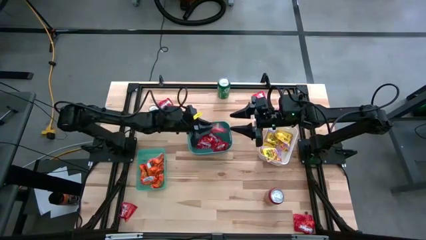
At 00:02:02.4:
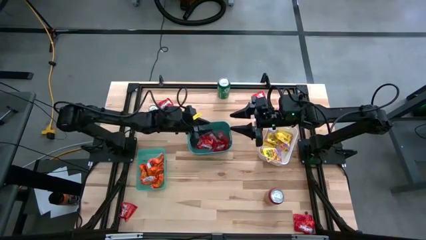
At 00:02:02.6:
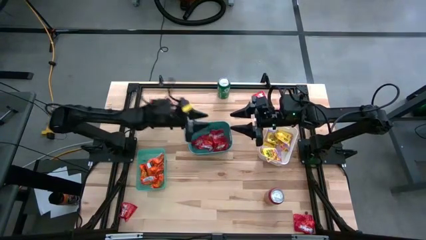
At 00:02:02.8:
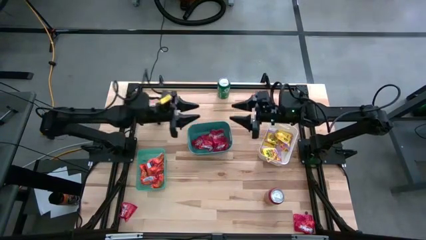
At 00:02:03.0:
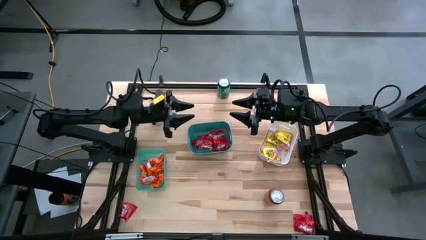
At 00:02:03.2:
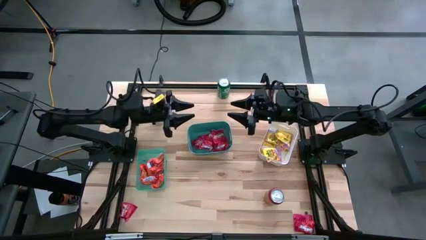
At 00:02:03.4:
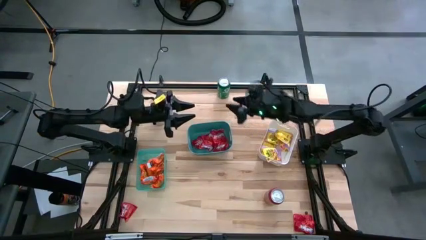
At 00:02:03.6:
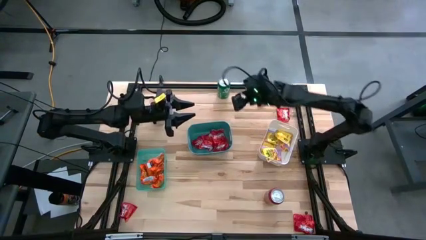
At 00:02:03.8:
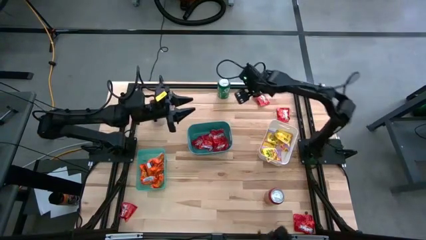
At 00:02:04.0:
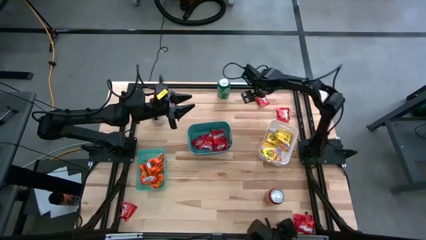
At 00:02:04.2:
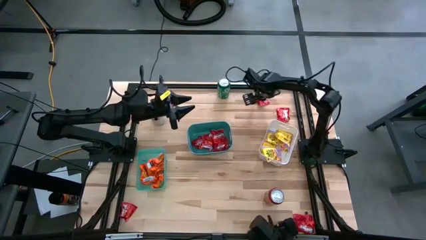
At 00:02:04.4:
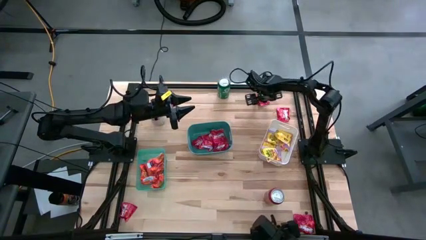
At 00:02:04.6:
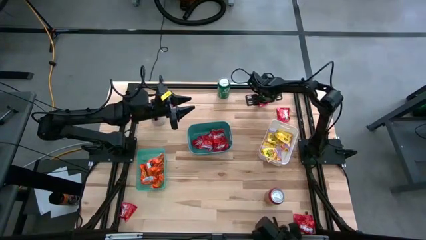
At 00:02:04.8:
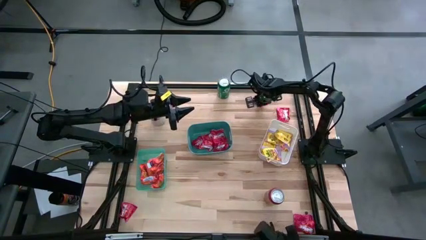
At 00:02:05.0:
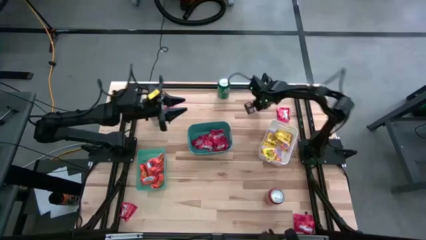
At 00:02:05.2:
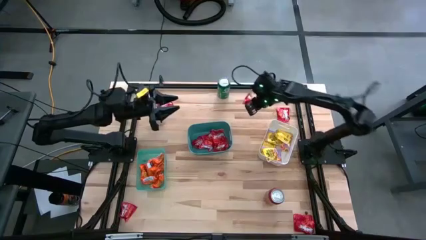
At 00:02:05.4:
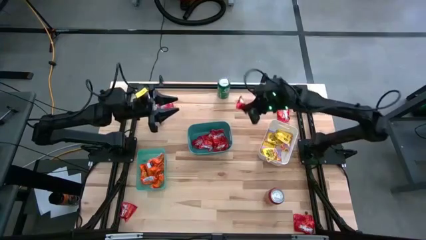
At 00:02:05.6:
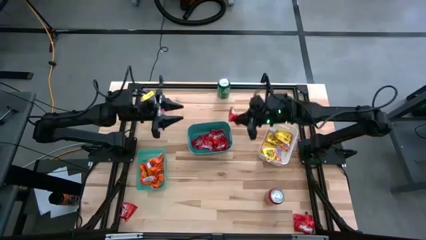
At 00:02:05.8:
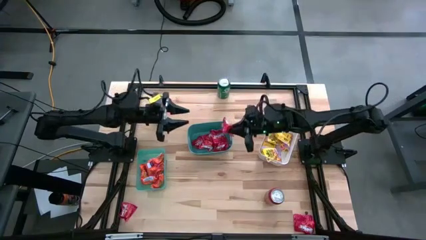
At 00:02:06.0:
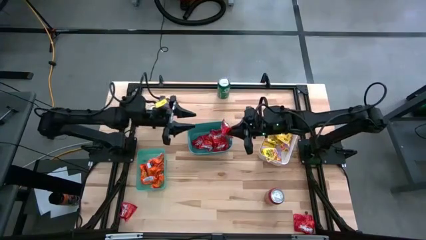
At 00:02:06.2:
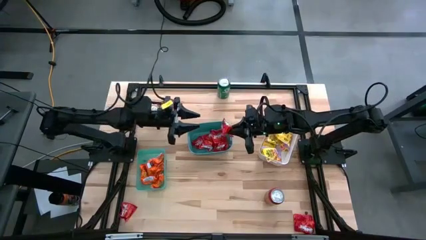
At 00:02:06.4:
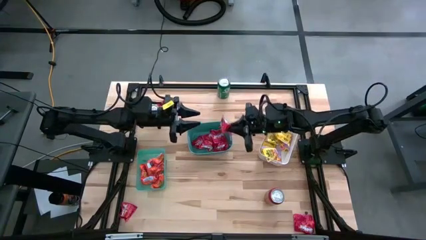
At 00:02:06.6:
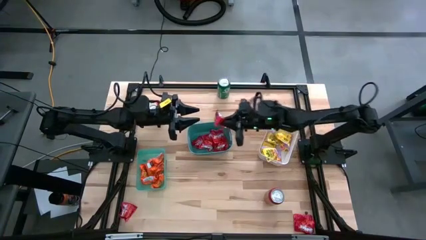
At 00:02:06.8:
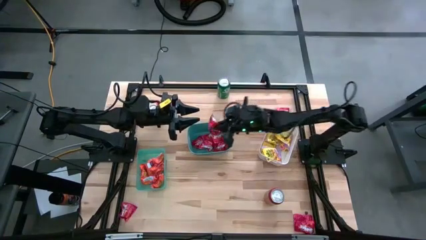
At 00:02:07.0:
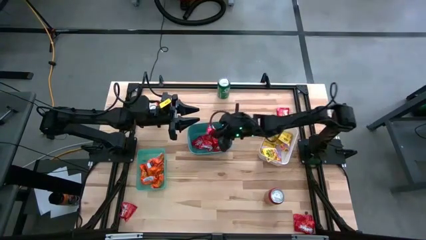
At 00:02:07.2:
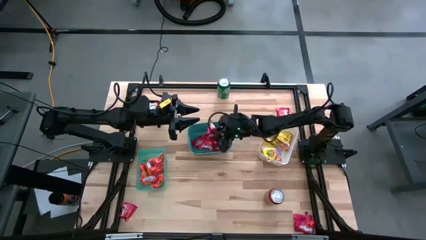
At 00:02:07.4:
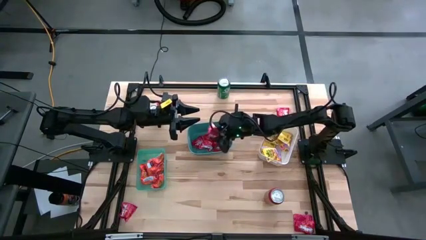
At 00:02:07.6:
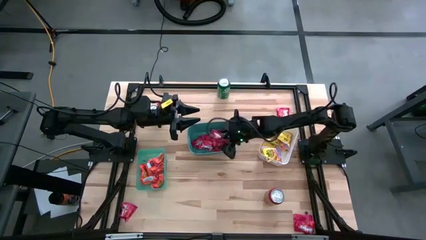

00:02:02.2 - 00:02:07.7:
Task: Sort candy
Put the red candy into the green bin

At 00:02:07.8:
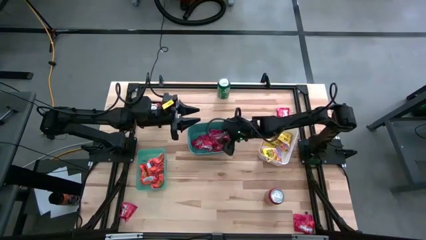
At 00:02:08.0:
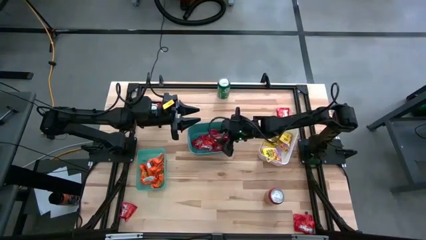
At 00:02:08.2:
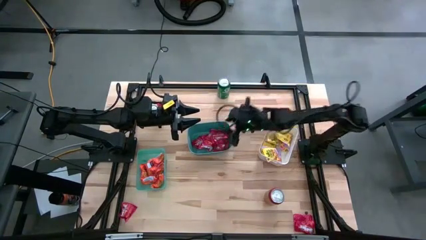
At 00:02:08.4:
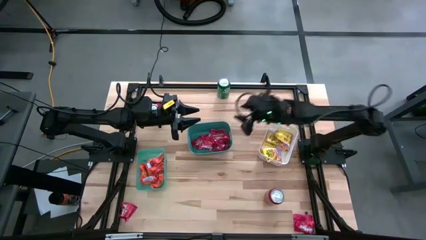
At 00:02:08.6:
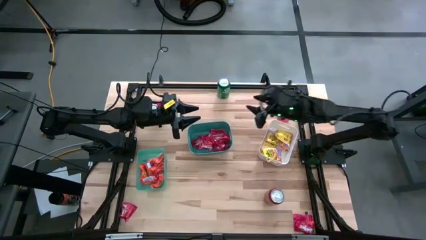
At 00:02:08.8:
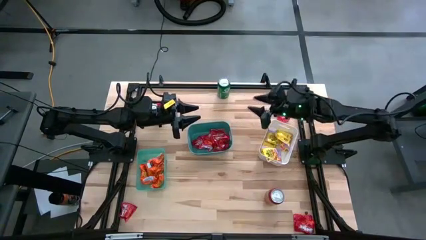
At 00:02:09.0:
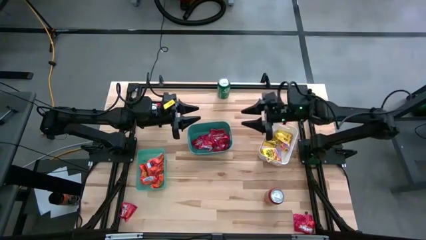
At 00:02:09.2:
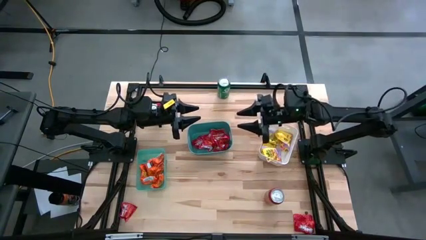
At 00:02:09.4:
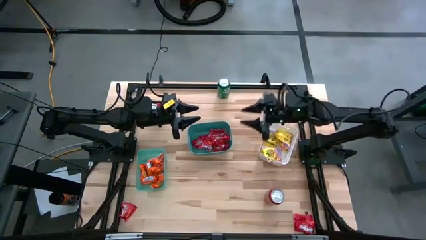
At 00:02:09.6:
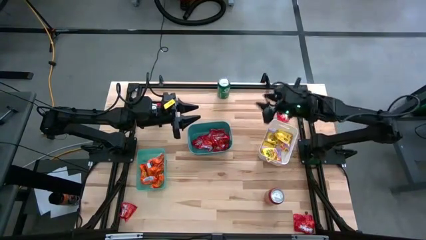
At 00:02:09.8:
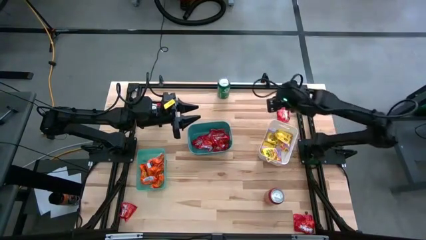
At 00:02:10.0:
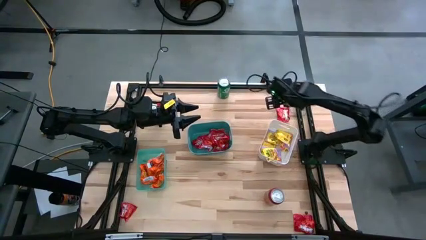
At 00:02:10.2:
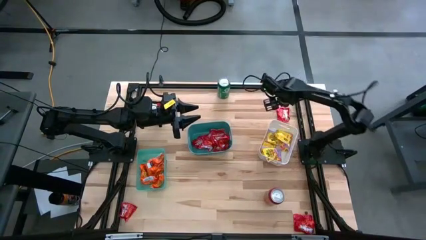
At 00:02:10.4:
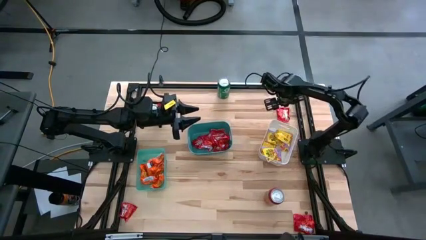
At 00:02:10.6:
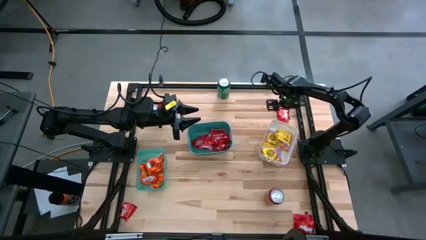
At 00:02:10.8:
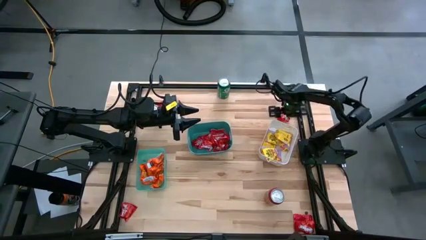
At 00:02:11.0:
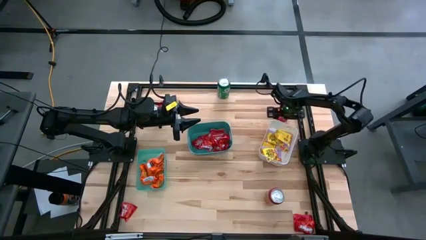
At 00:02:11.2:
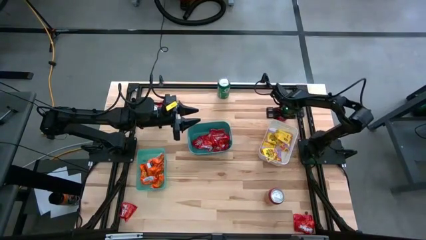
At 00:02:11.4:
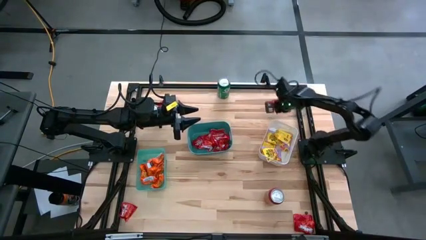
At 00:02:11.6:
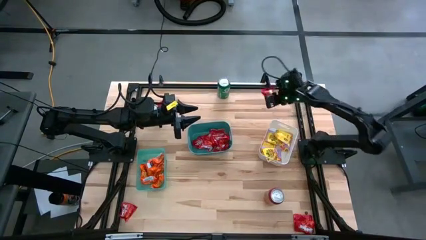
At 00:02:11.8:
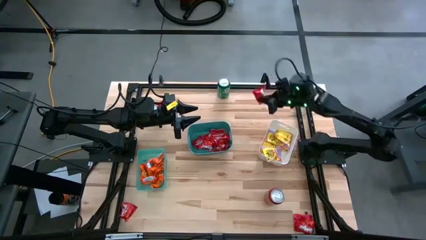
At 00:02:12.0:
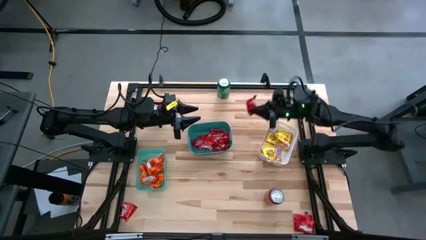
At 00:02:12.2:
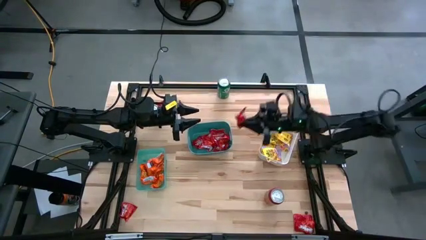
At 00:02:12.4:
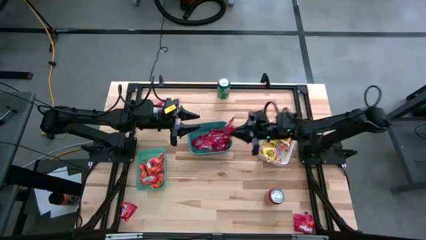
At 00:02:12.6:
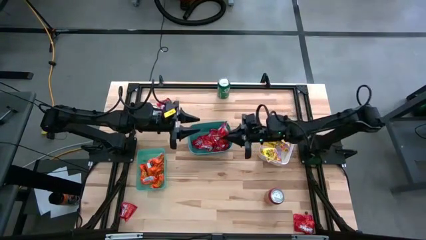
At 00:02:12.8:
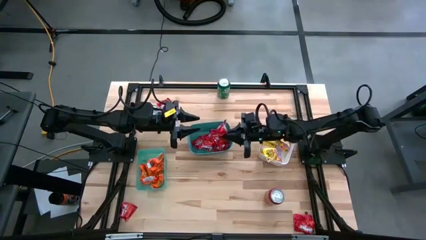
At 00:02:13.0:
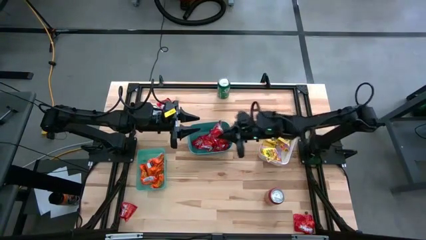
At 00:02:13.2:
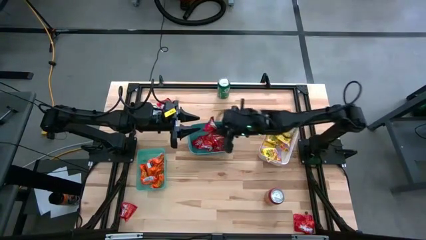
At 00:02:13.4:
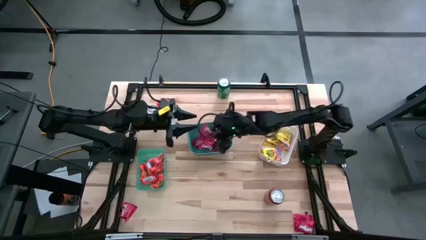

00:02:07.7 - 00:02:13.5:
Put the red candy into the green bin

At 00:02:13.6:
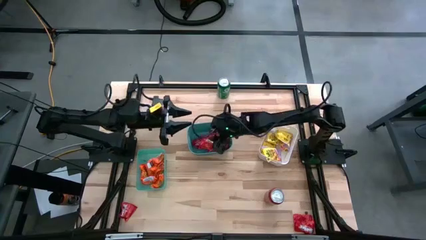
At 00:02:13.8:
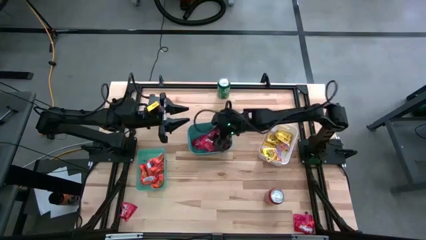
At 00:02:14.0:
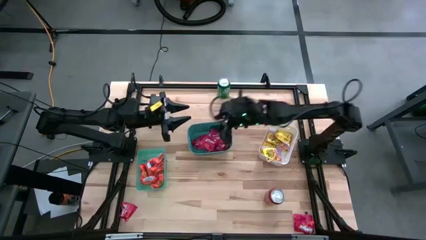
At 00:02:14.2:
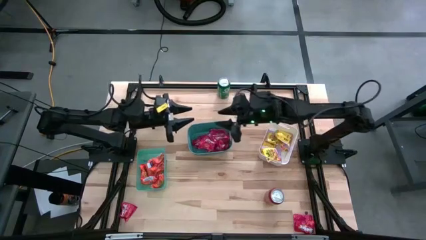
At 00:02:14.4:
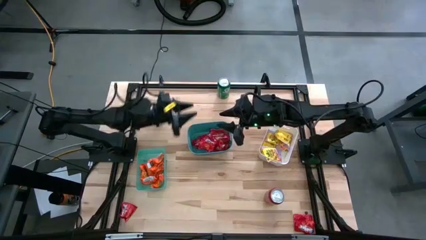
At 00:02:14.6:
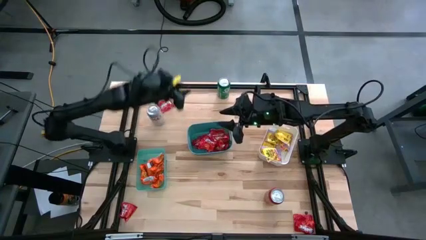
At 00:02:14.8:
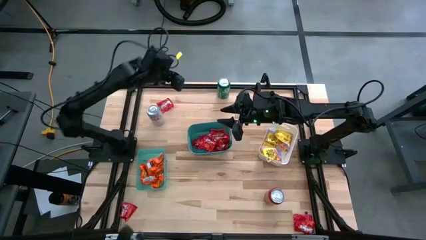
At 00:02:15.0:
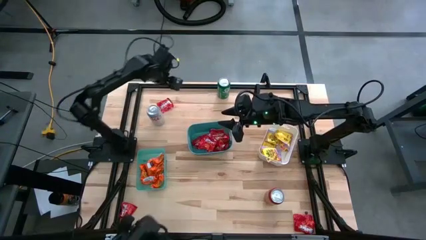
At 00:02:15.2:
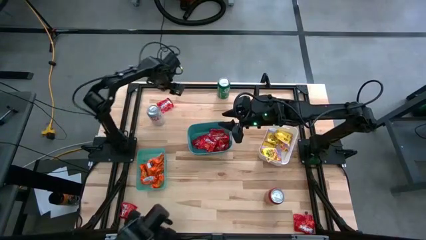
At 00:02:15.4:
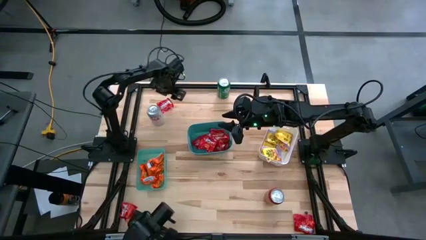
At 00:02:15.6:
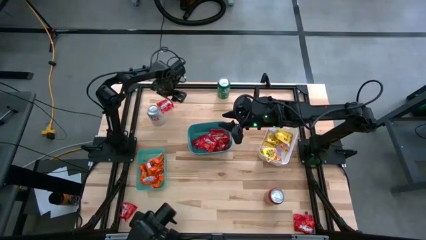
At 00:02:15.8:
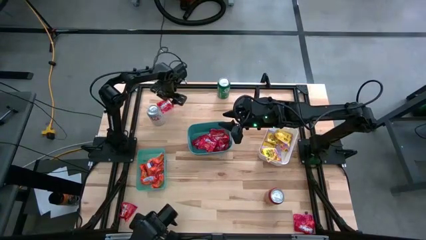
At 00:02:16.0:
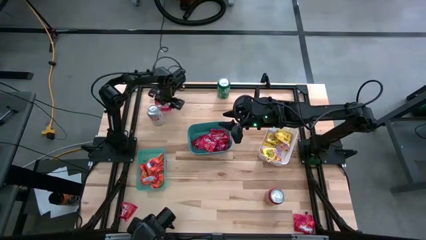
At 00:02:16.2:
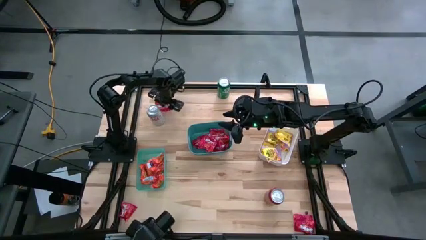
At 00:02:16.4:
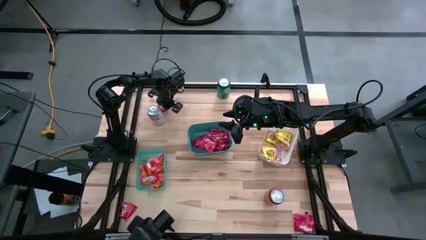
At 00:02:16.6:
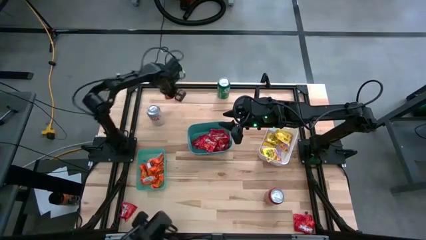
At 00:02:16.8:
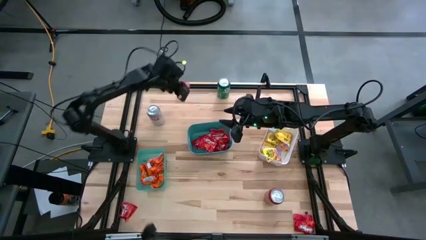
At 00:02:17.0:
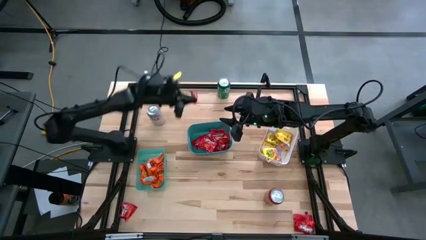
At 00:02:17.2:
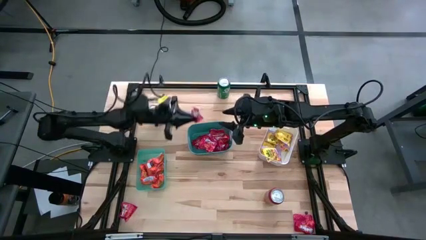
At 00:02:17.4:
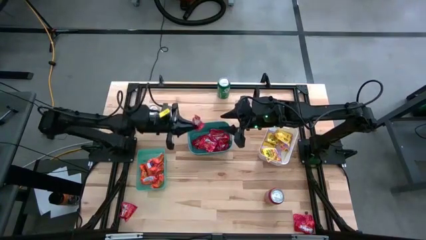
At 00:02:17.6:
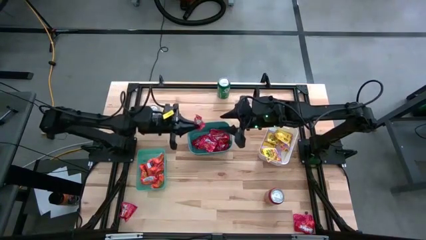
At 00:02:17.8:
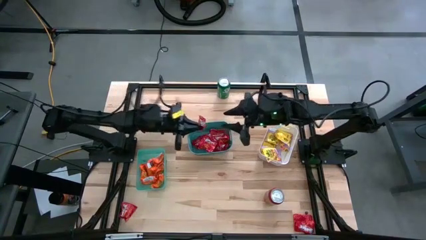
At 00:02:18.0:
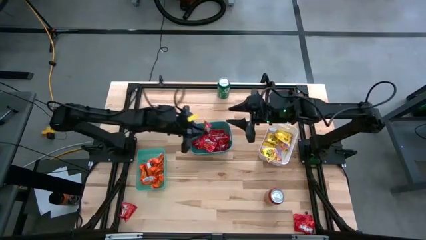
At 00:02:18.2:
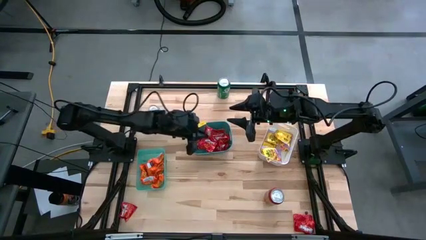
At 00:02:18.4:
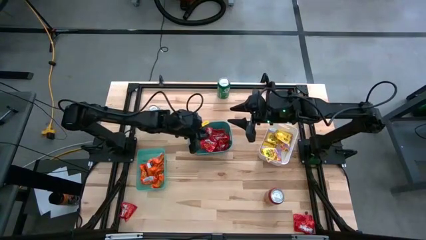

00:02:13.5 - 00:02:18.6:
Put the red candy into the green bin
